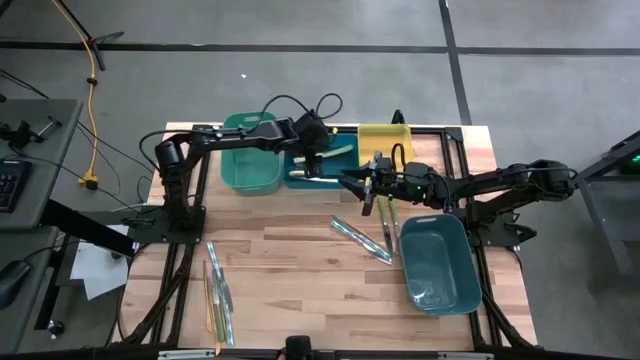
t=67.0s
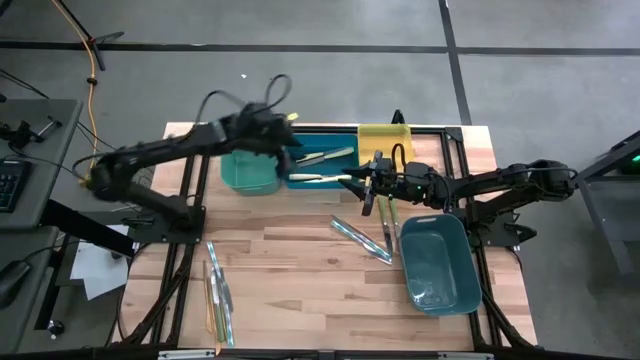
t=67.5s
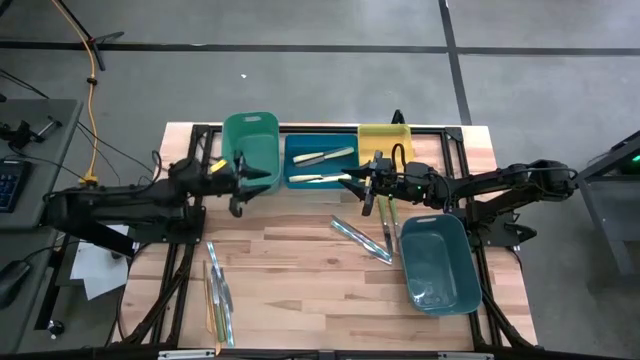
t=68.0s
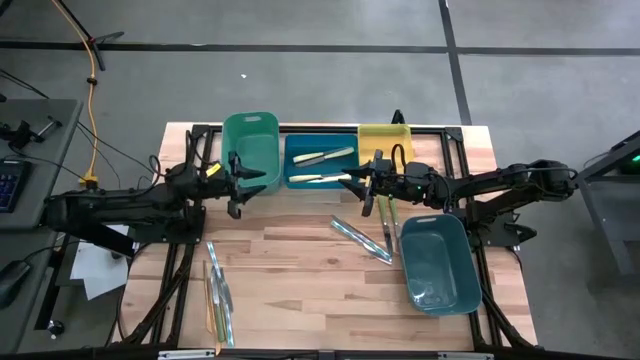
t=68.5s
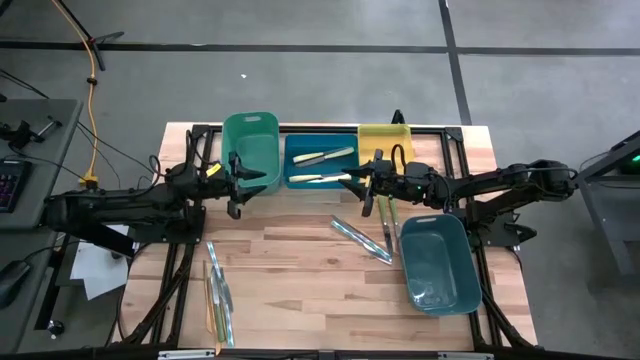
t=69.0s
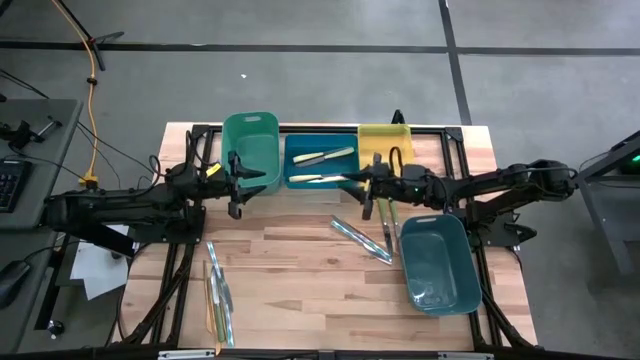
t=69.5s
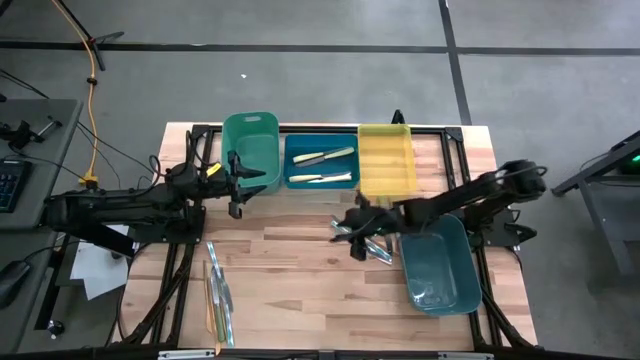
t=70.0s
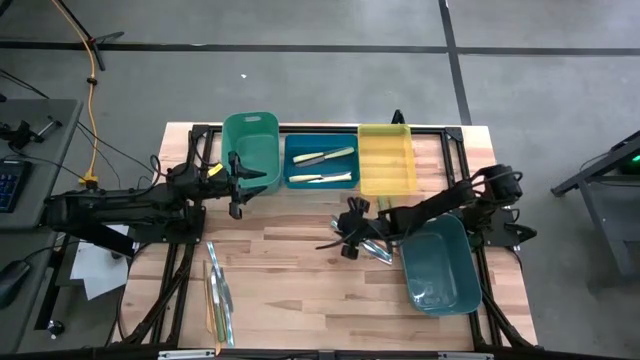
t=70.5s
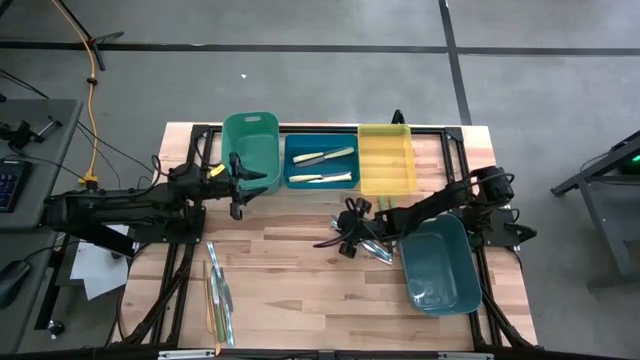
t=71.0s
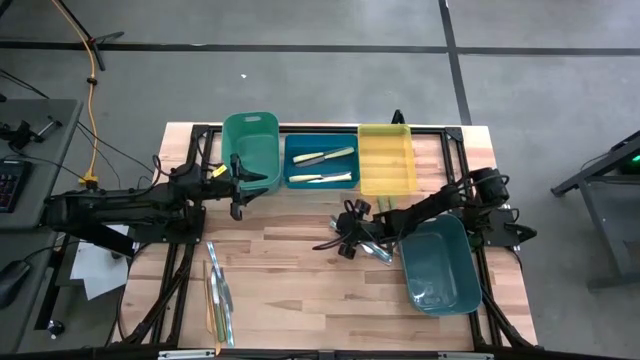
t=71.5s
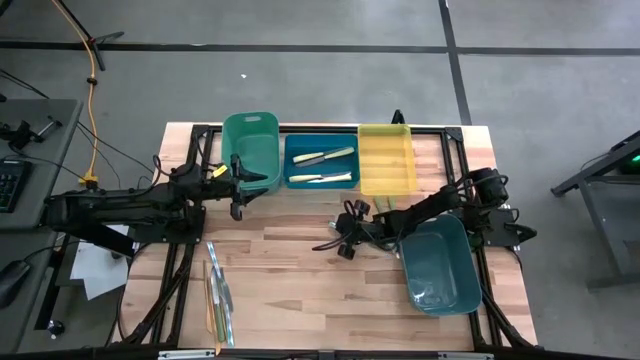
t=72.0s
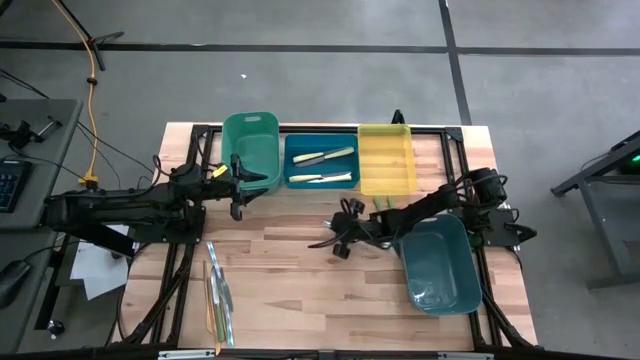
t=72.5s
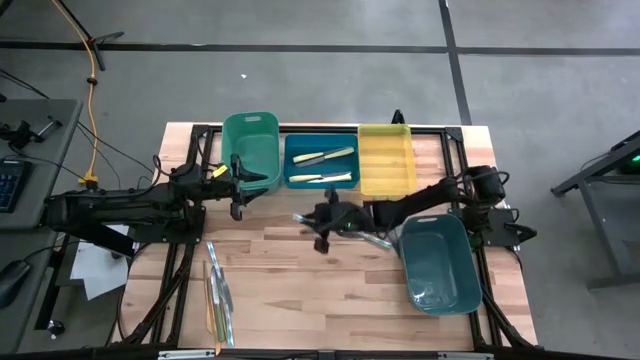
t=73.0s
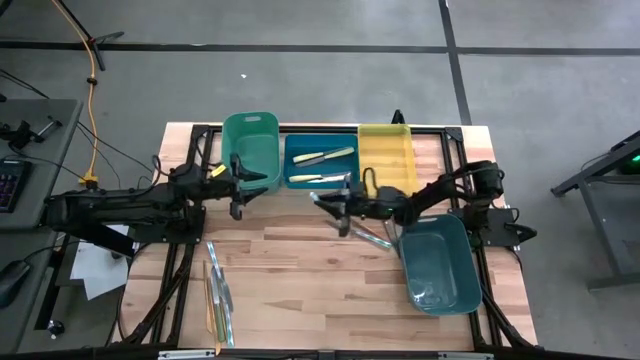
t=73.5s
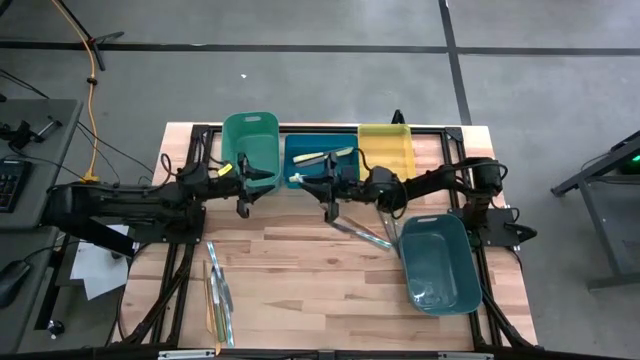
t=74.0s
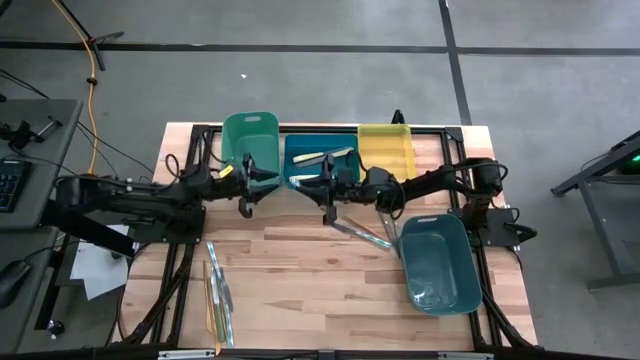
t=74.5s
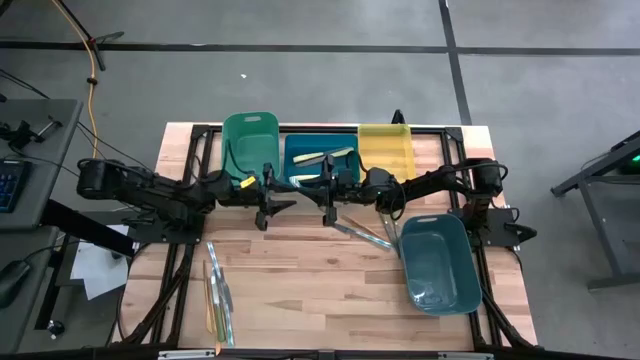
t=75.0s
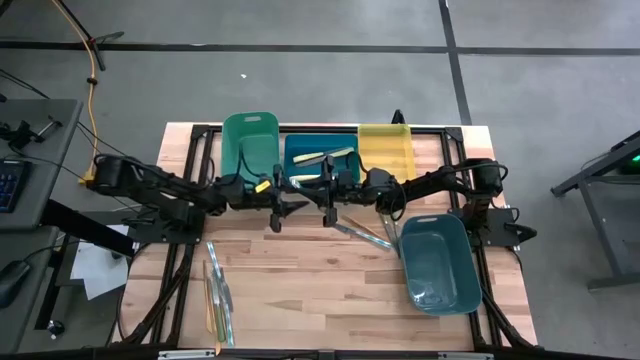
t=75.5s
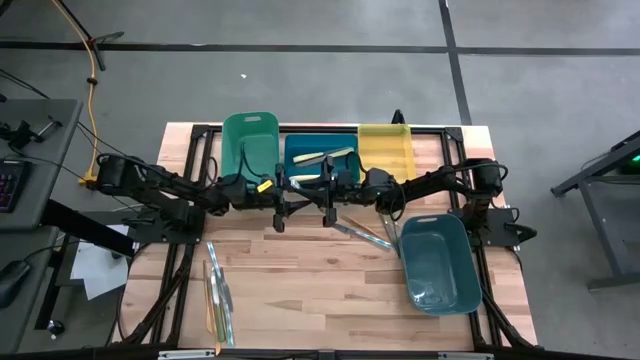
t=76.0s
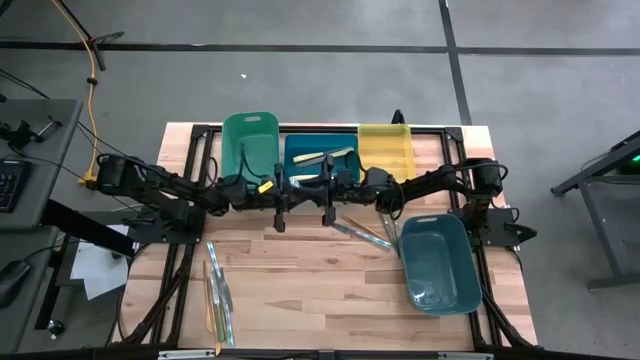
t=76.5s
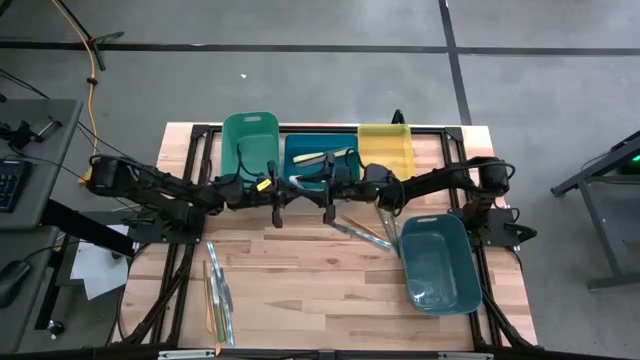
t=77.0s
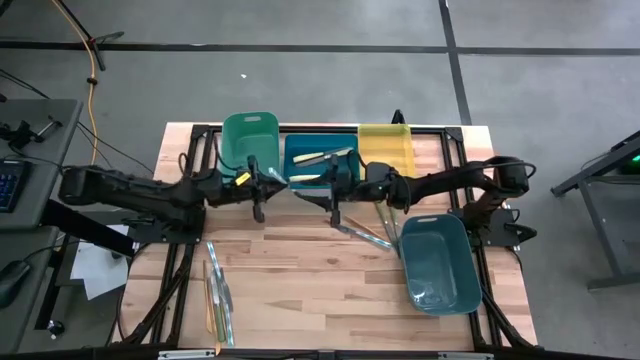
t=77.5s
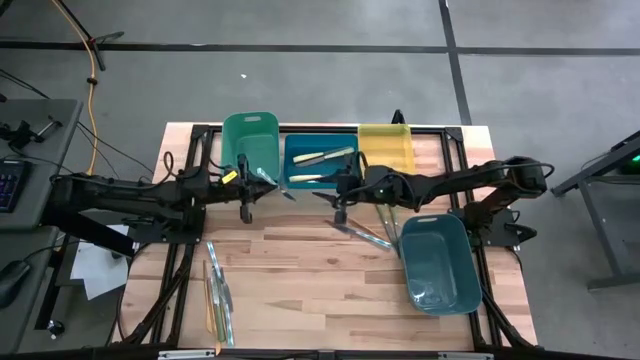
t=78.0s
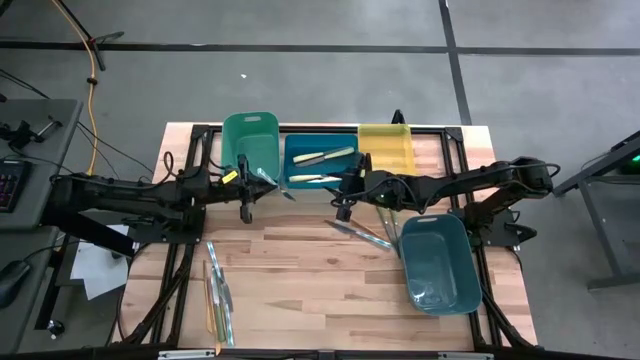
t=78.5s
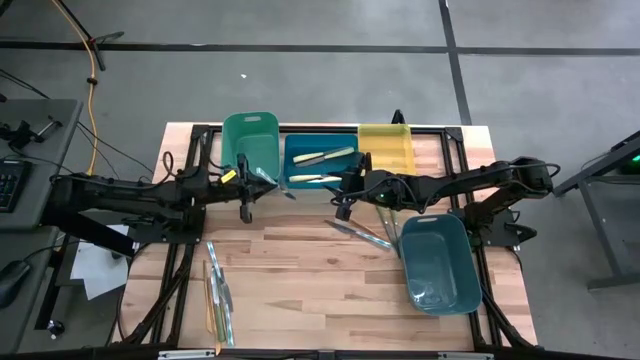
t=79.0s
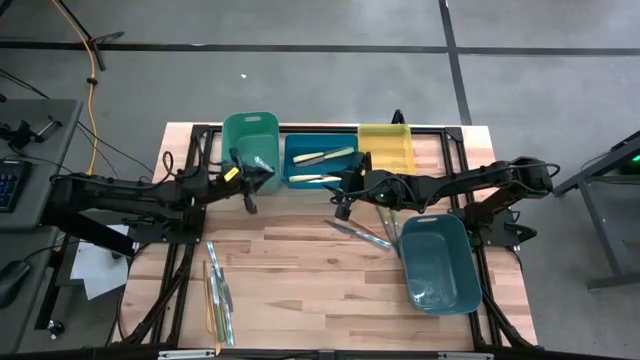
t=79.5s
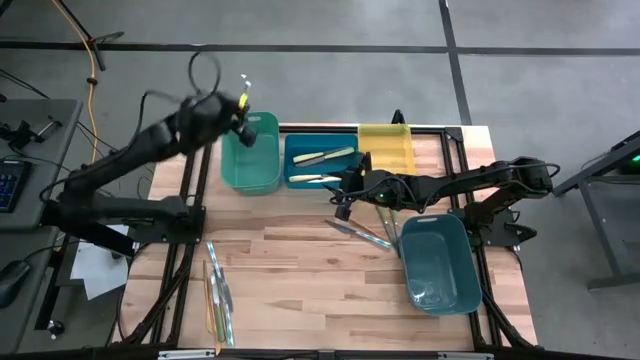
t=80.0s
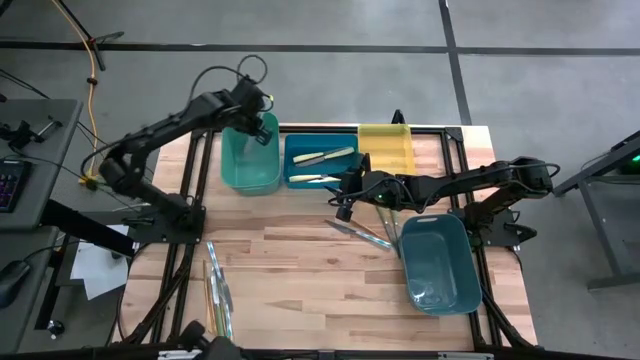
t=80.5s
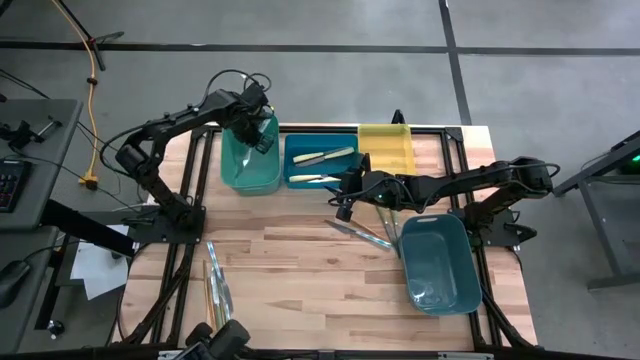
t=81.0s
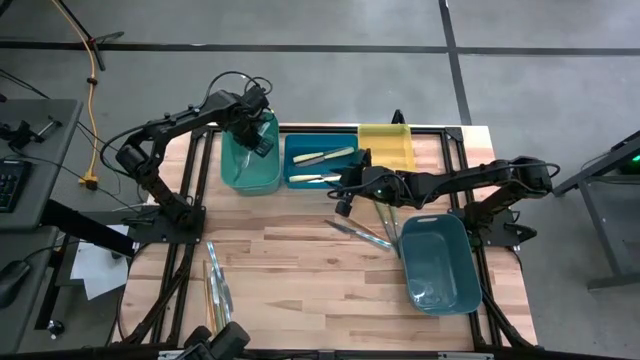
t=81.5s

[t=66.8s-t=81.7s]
Task: Sort silverware by color (type)
Put the blue knife into the green bin
